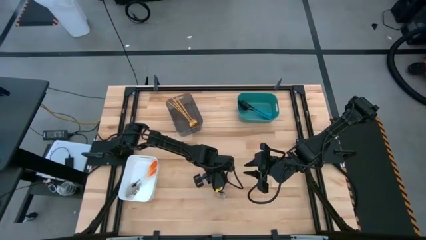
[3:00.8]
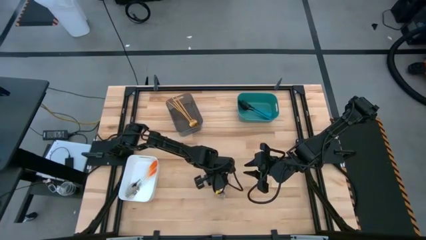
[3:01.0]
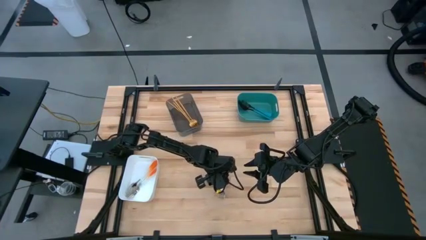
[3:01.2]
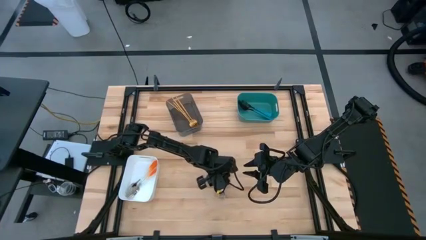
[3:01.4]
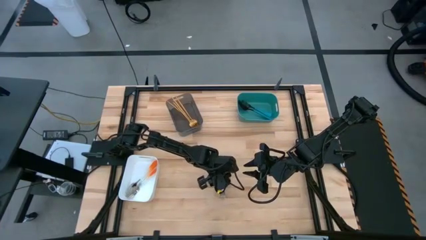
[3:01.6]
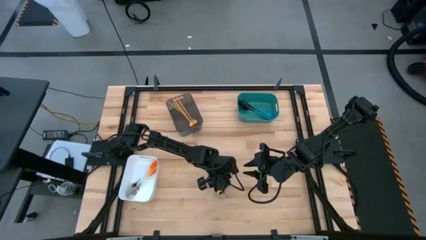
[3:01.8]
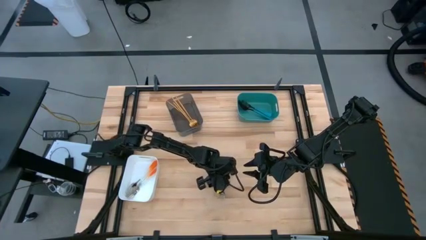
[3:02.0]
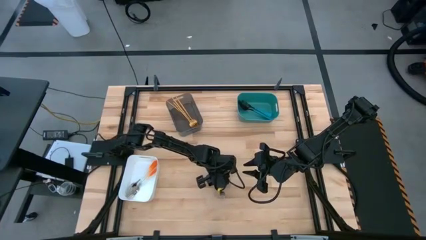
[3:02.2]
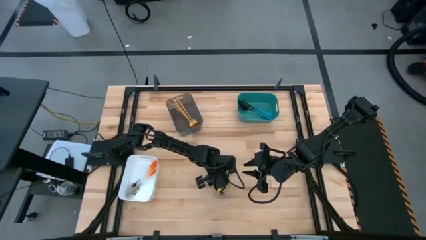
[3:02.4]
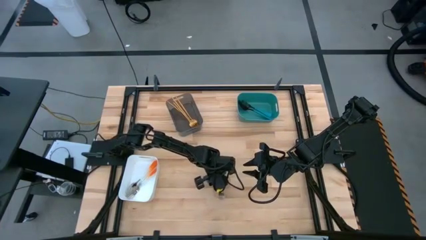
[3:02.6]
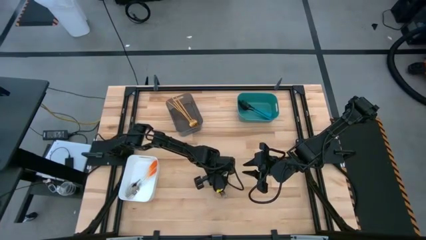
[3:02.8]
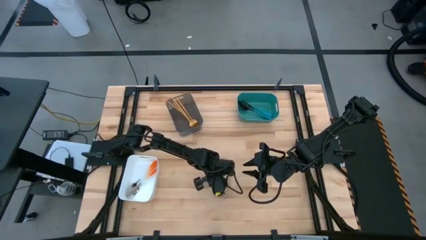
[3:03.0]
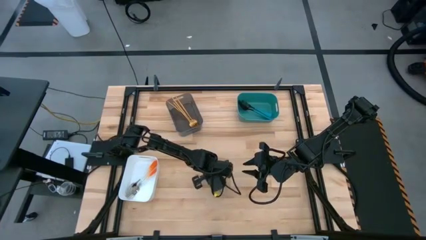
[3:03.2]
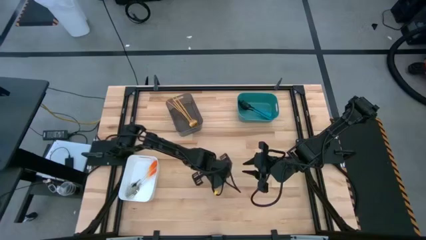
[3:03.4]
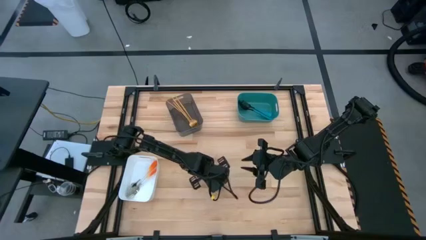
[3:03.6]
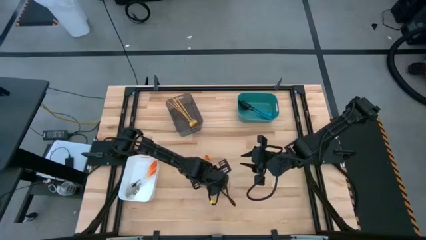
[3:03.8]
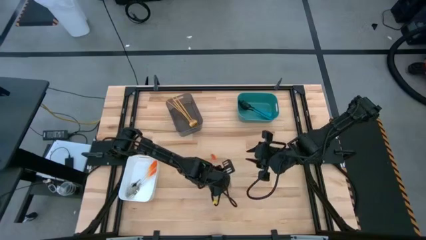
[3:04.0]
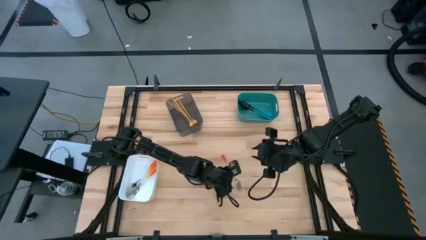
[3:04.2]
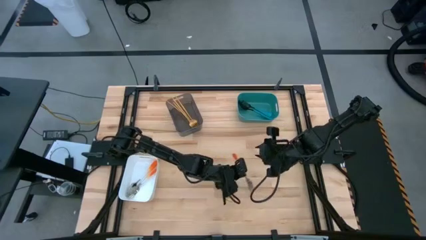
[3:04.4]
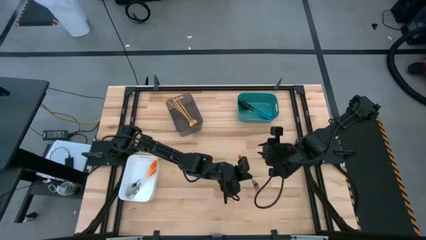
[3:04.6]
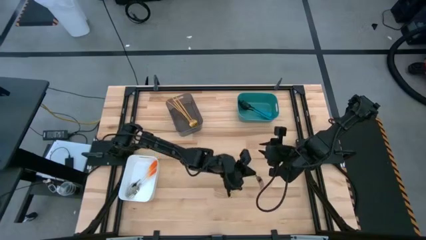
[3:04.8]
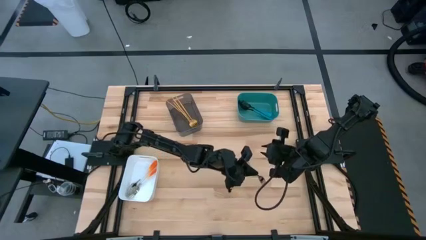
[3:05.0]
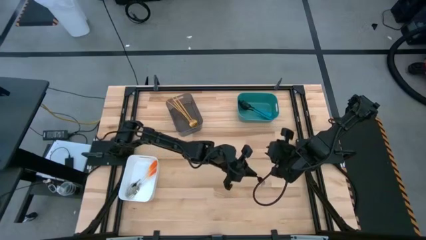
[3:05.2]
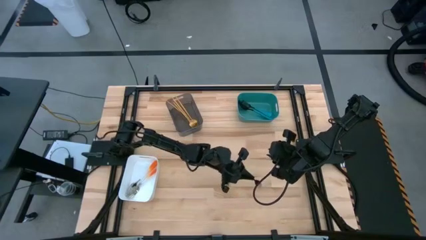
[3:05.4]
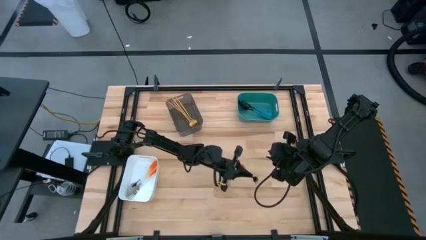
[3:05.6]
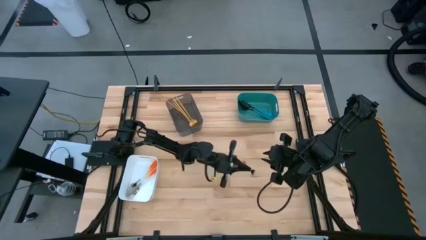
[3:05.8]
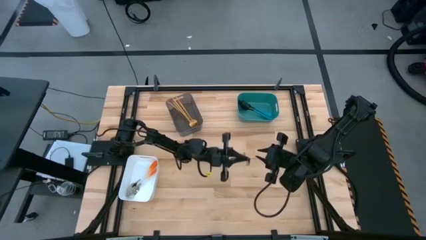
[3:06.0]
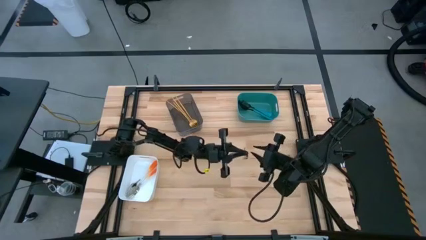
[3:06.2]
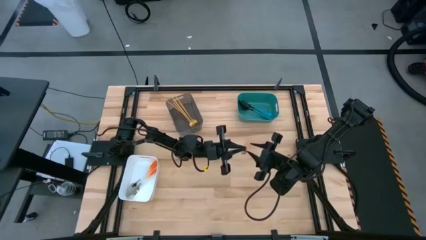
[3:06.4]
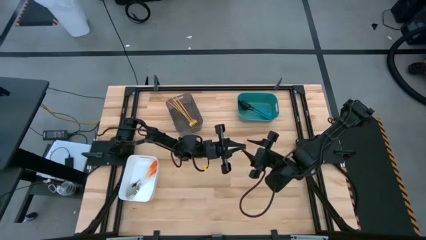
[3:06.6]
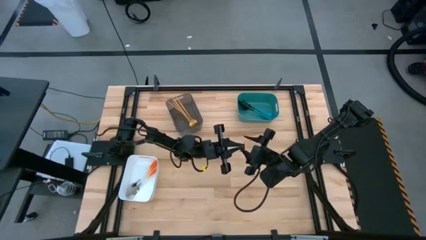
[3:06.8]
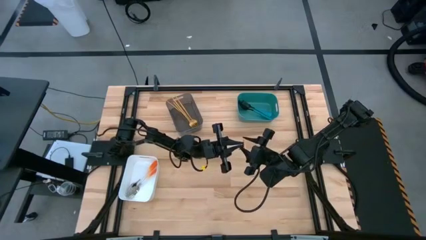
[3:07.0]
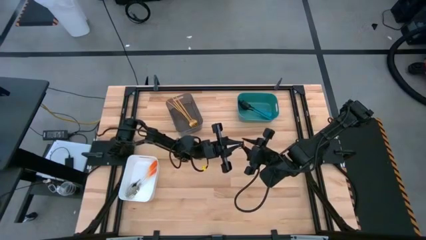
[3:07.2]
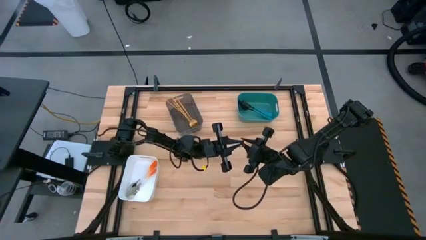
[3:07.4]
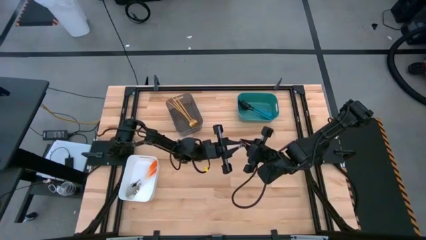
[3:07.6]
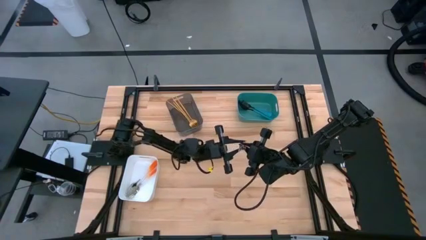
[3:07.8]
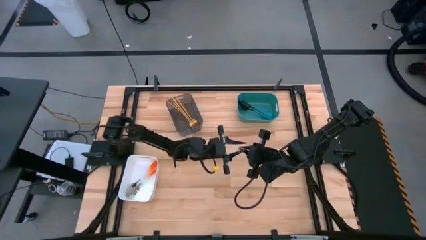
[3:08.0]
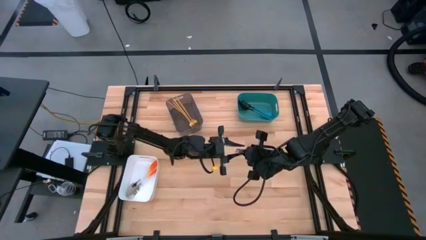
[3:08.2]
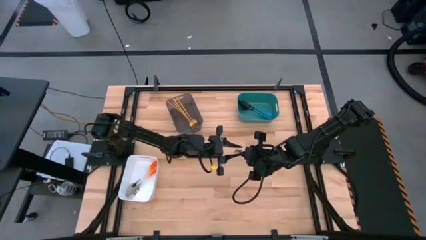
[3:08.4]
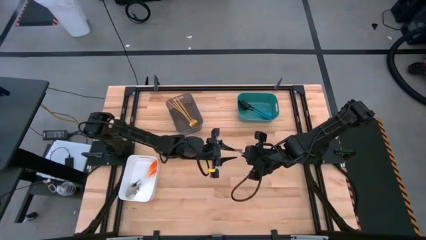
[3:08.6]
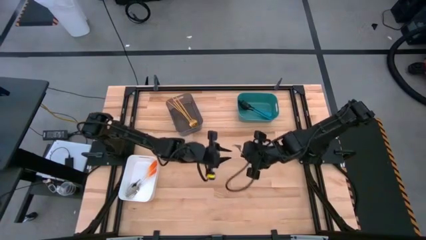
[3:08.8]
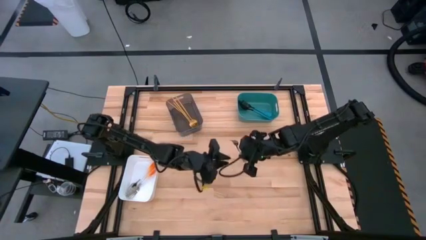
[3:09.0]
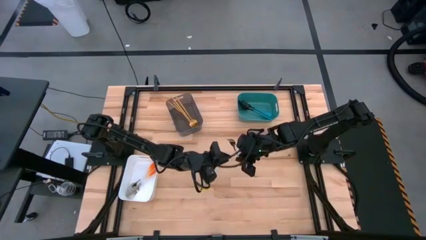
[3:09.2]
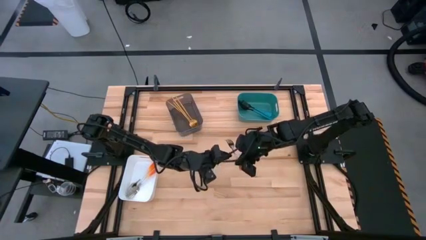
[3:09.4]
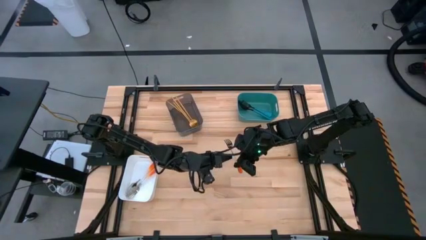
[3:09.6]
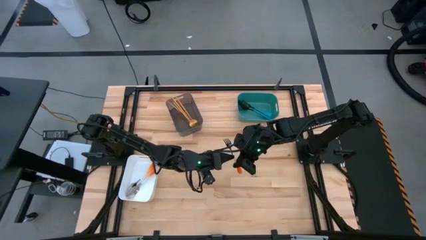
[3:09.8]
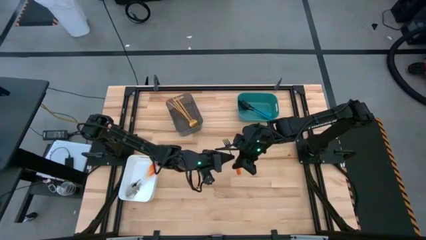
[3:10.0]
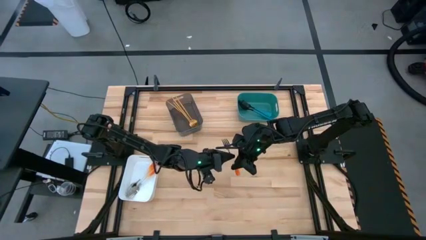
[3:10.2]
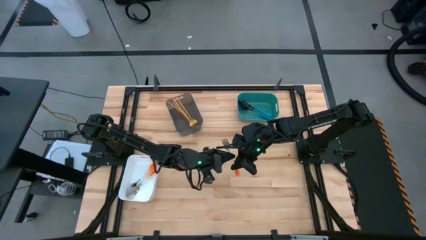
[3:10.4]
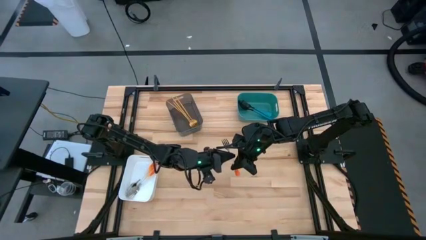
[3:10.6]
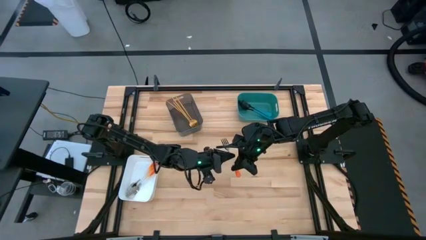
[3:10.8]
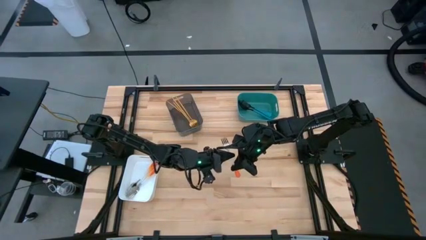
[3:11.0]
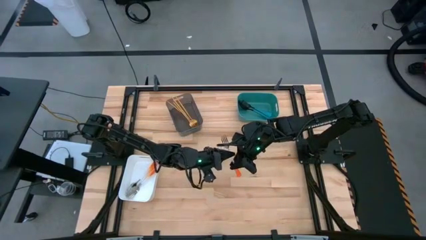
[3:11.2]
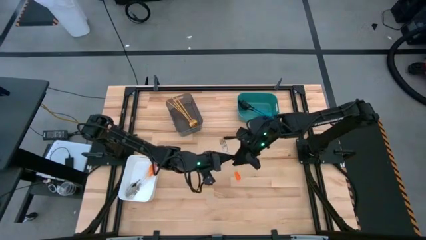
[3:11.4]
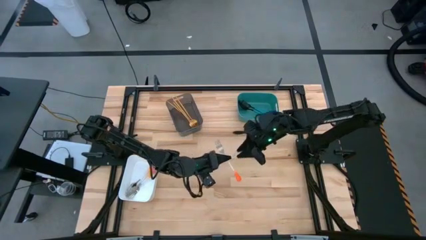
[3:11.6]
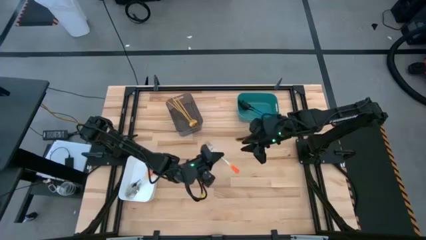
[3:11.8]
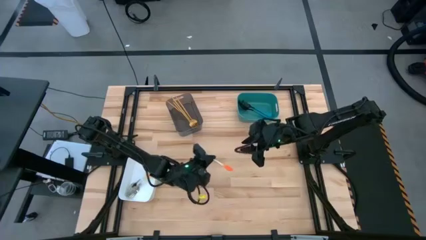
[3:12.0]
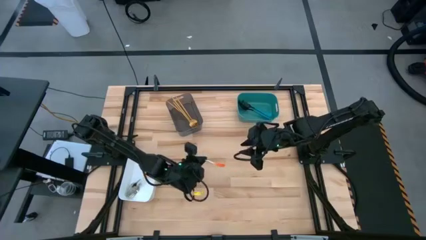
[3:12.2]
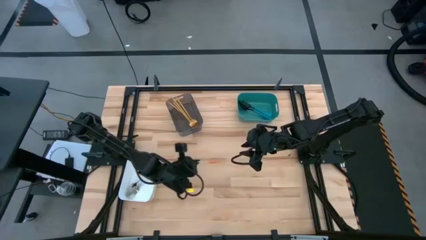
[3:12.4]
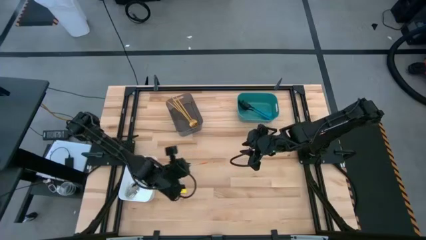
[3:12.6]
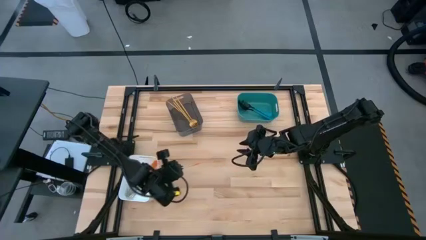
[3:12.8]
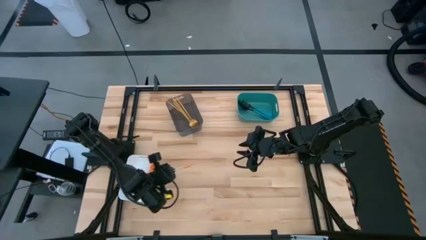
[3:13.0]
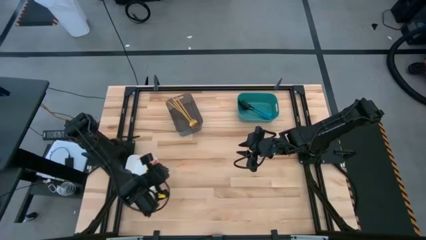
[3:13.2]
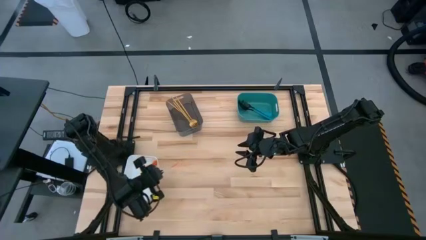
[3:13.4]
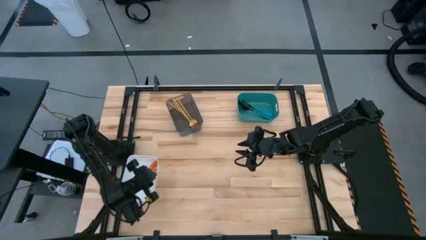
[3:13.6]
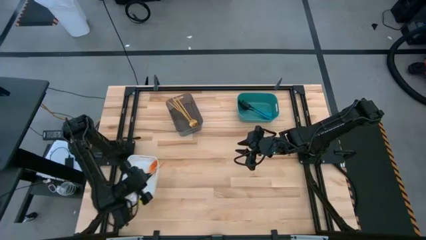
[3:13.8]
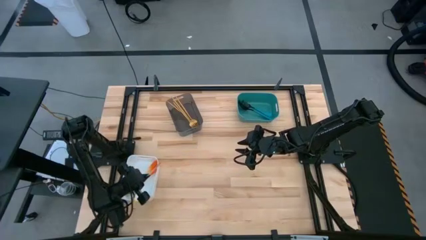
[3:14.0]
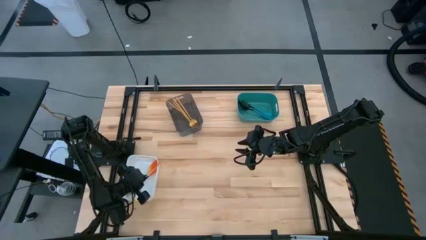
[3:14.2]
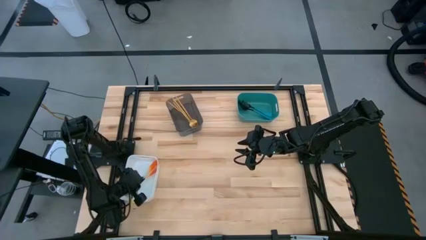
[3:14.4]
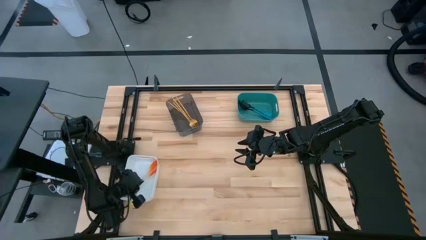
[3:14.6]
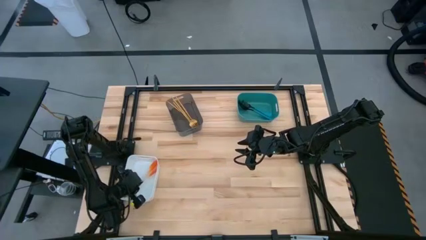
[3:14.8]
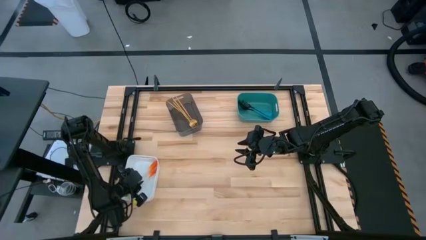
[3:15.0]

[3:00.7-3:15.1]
Task: Sort silverware by color (type)
Put the orange fork into the white bin

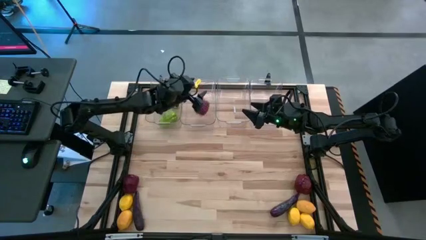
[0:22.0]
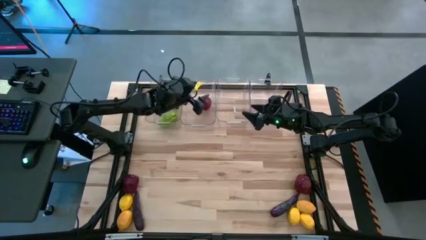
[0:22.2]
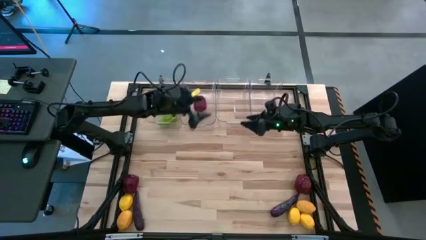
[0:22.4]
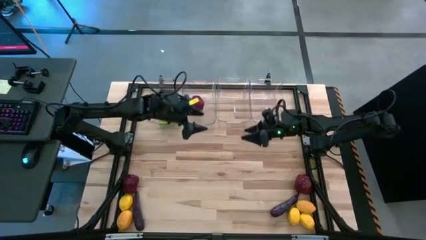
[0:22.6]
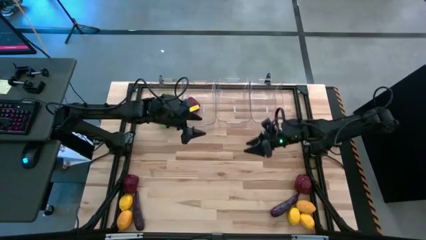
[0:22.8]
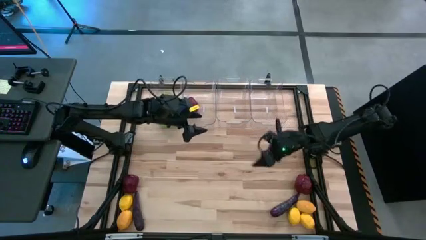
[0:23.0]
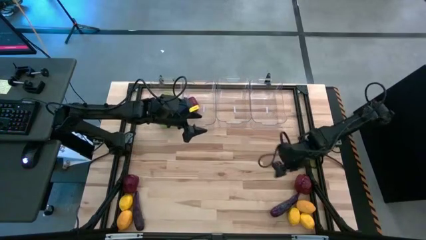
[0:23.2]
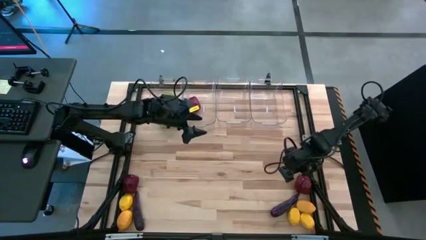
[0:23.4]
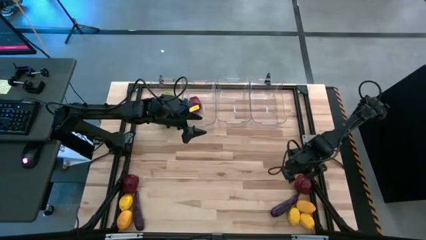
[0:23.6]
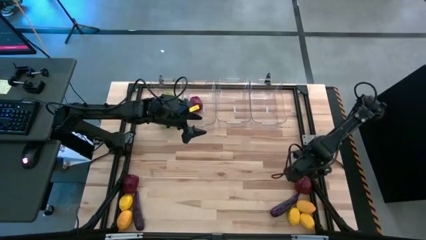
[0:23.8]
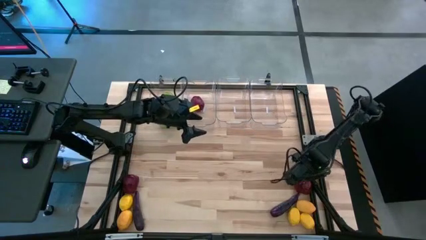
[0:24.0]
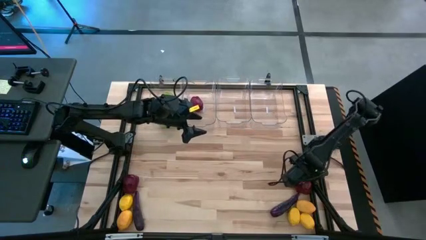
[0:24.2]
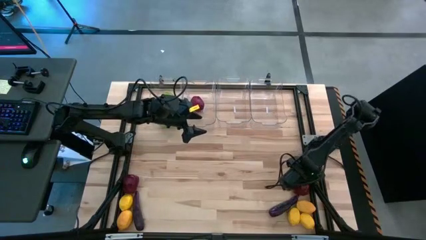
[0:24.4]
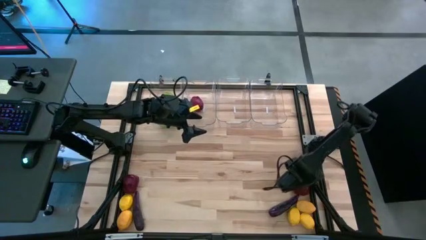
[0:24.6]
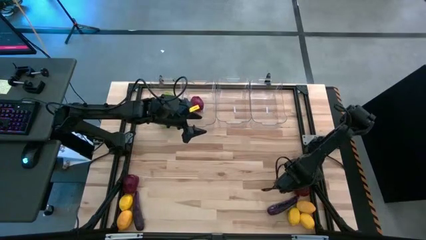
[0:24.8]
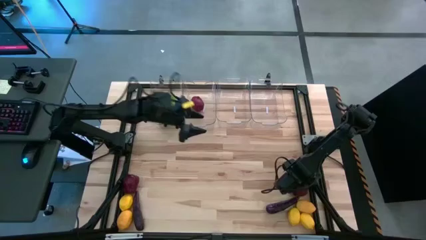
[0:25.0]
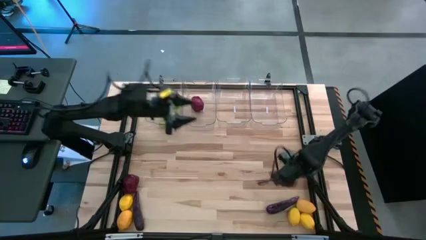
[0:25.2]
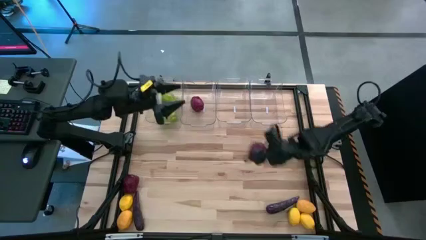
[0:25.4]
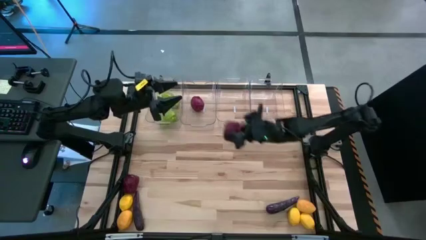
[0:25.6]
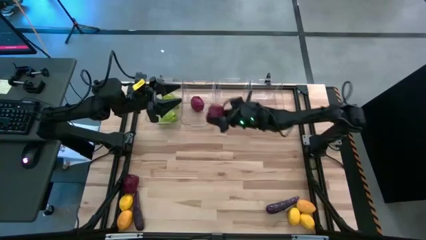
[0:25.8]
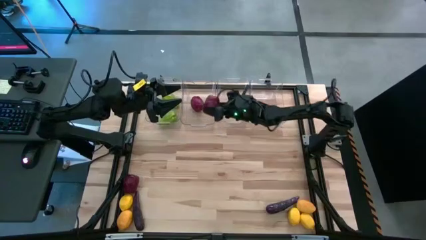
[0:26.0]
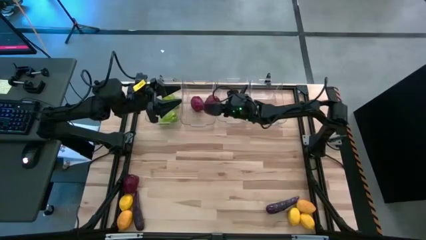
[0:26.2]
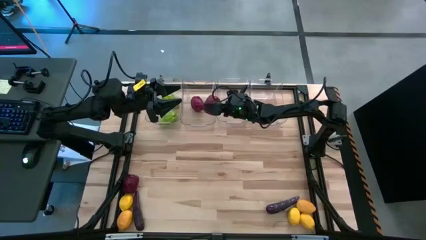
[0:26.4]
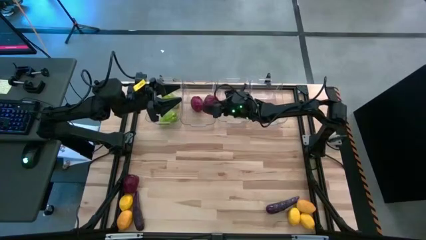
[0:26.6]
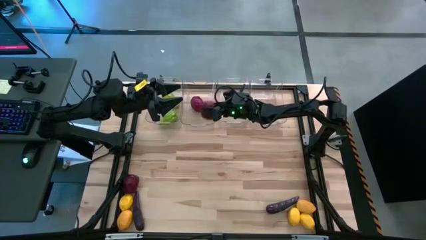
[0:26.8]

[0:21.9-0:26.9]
Task: Sort produce into baskets
Put the apple into the middle left transparent bin
